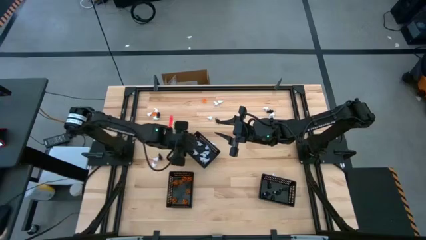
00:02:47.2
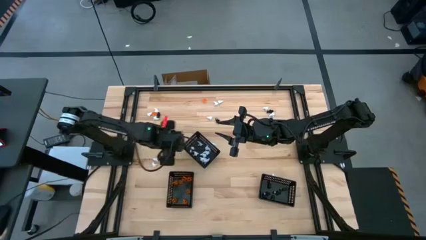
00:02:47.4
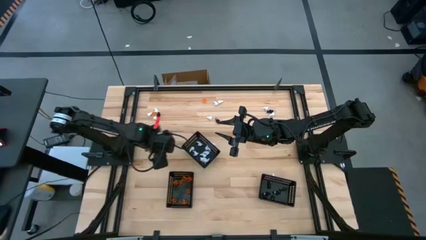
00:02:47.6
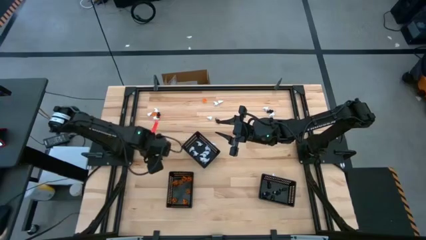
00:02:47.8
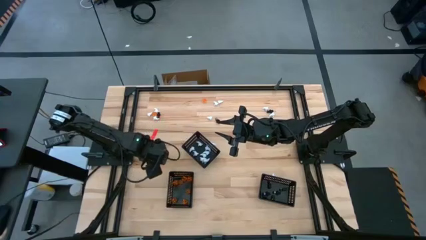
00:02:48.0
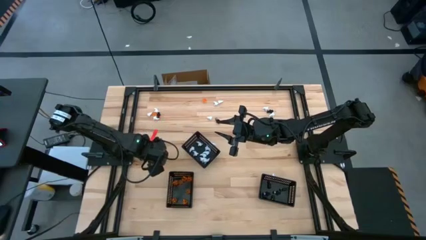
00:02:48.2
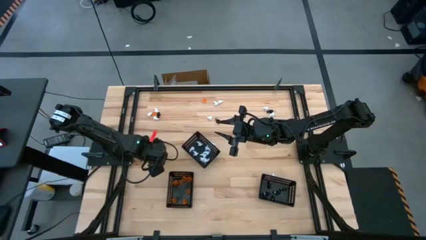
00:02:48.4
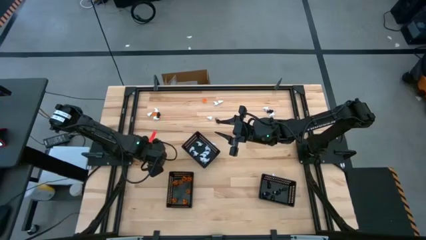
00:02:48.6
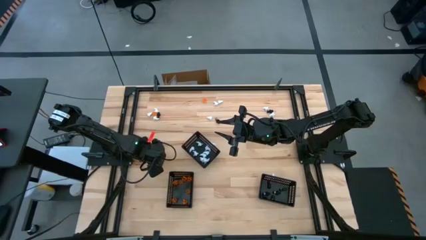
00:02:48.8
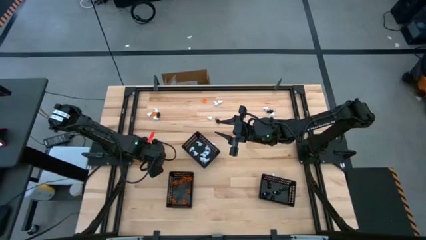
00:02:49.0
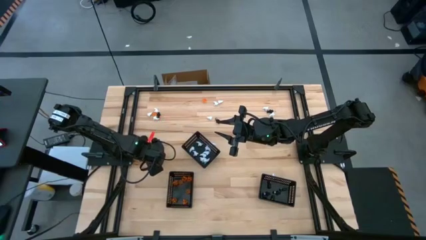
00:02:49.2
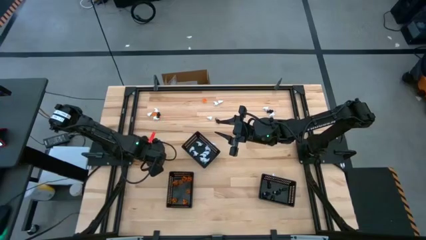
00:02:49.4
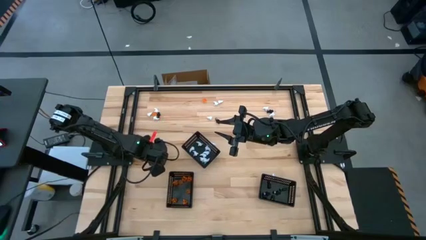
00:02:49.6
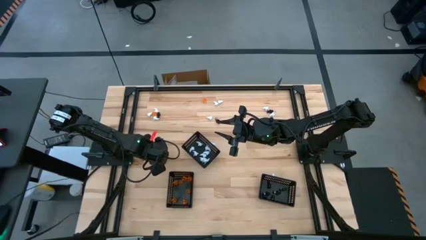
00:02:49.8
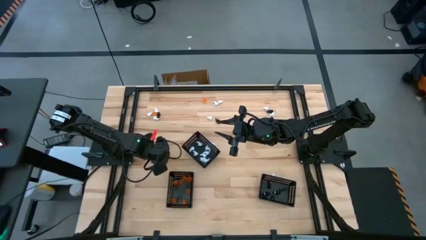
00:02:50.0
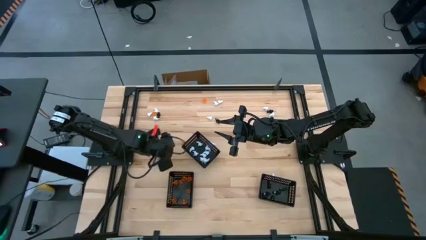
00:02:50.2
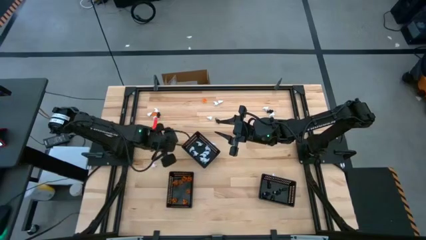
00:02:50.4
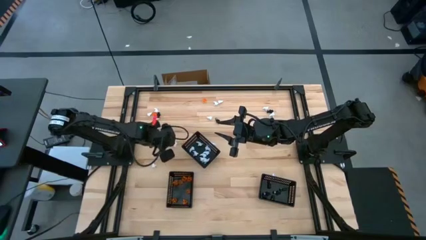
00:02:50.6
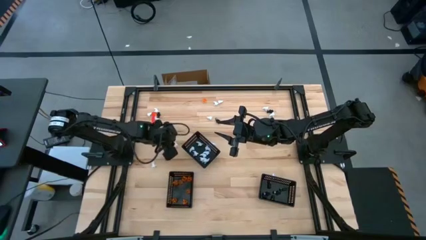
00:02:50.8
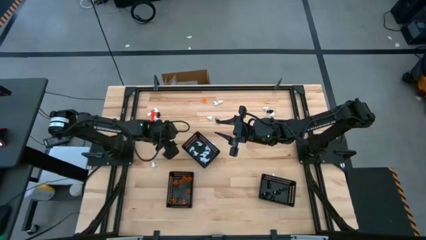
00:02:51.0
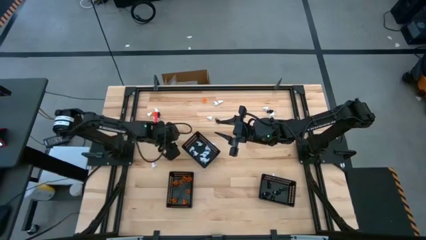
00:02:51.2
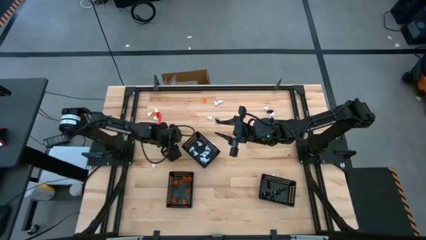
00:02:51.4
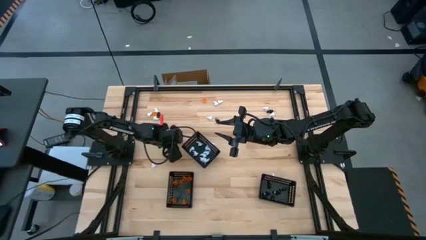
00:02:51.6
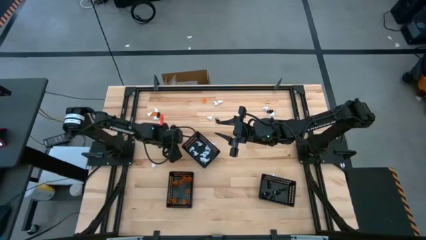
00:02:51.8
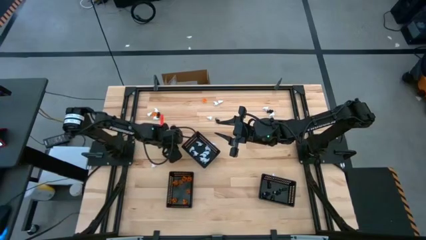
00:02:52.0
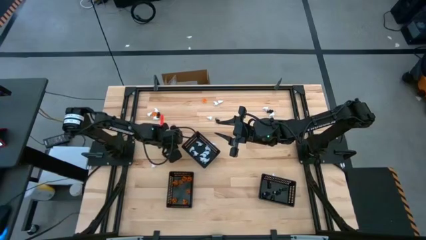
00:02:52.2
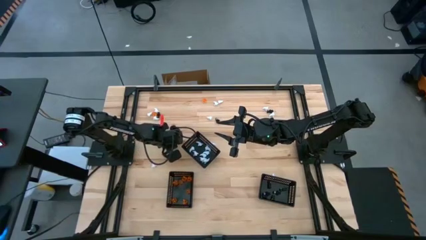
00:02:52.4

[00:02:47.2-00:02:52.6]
Task: Sort Halloween decoration
Put the white ghost toy into the middle black basket

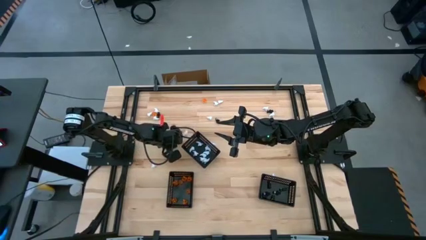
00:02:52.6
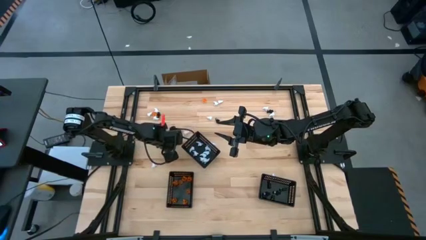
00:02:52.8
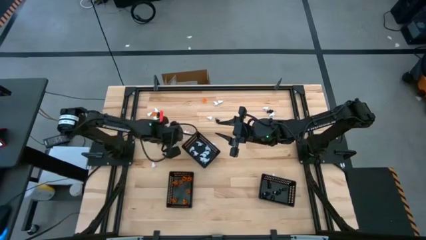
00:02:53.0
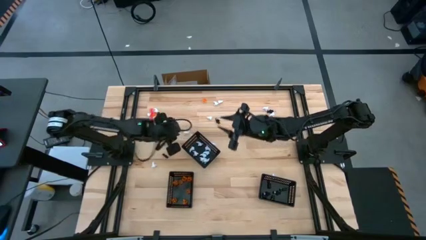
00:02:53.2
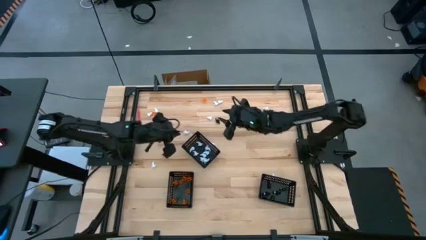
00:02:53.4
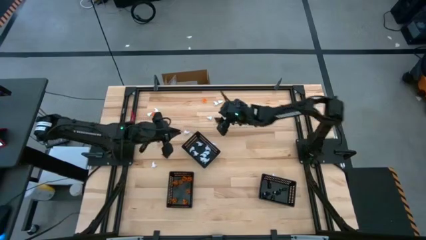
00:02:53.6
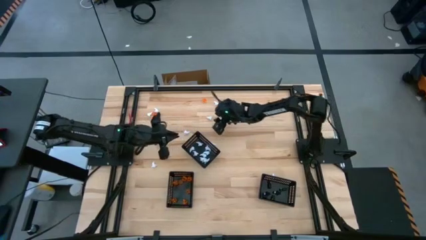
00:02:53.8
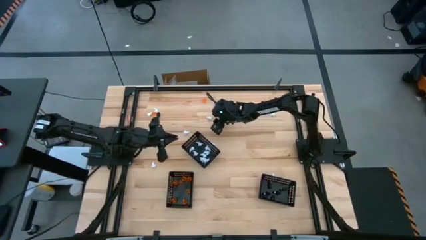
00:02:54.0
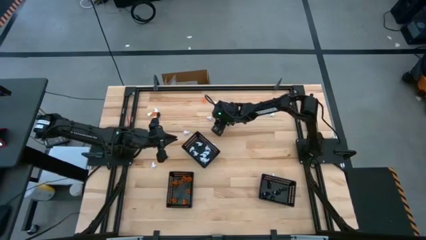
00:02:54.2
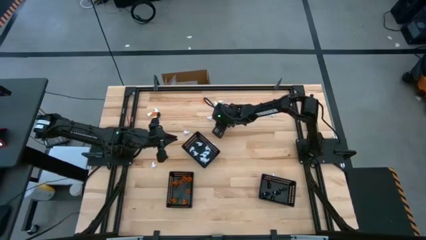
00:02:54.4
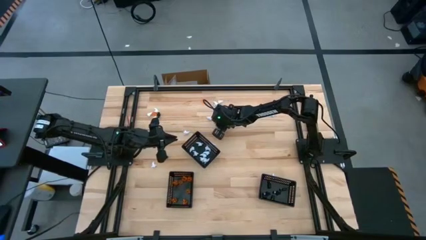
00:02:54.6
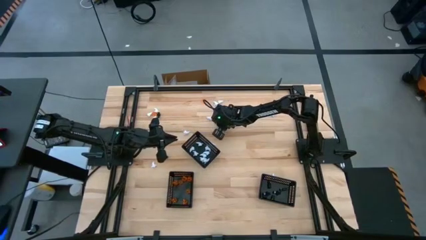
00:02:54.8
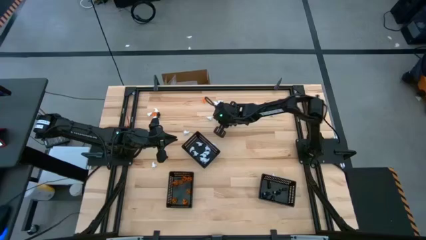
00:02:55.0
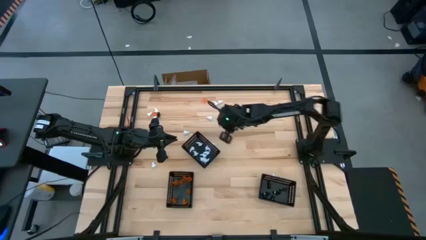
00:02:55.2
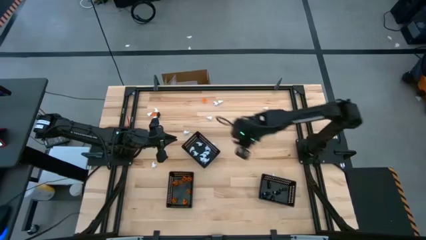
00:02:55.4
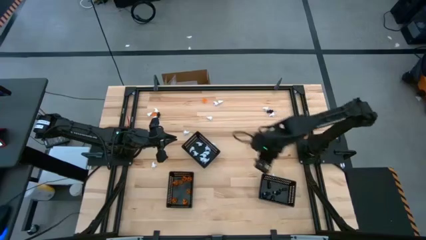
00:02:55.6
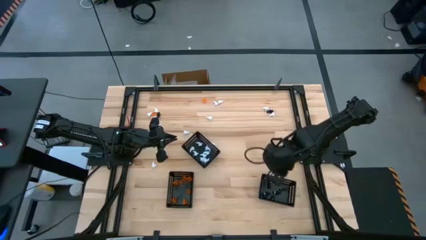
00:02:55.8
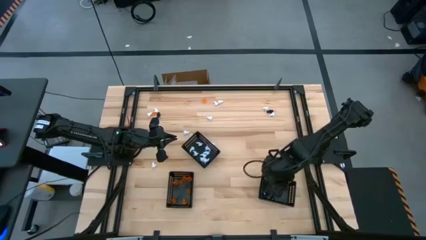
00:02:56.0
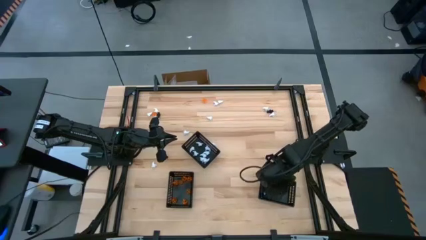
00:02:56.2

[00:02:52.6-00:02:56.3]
Put the black skeleton toy into the right black basket

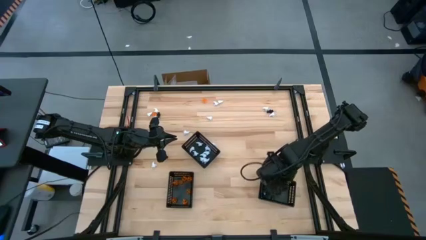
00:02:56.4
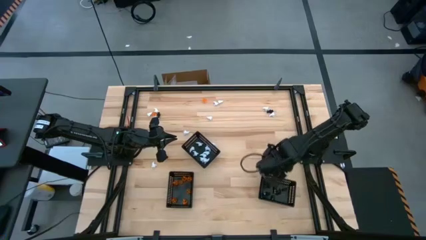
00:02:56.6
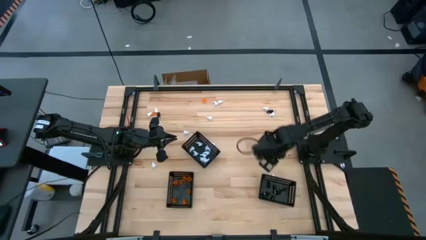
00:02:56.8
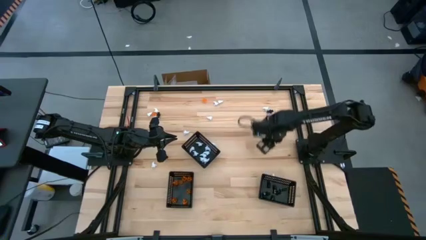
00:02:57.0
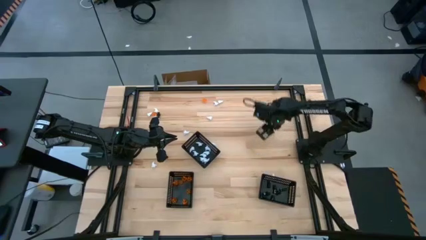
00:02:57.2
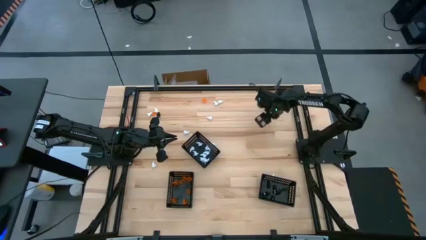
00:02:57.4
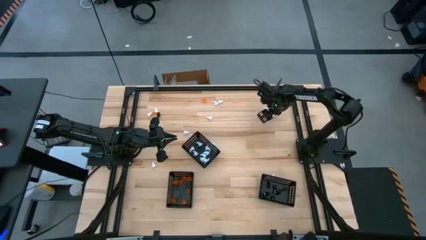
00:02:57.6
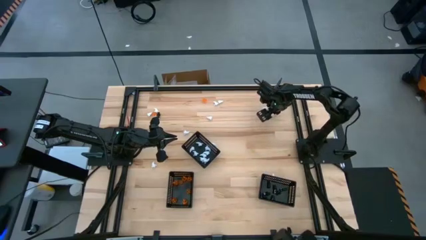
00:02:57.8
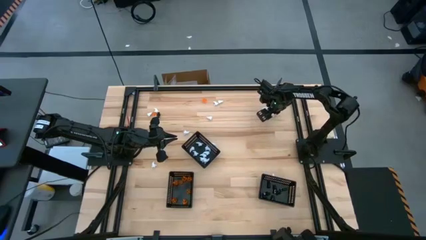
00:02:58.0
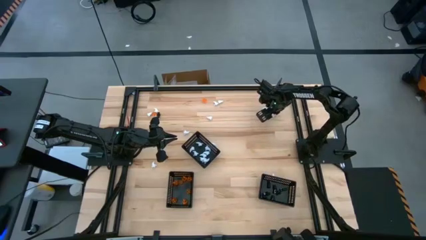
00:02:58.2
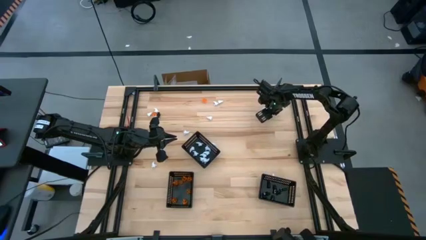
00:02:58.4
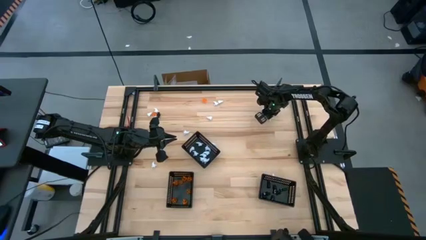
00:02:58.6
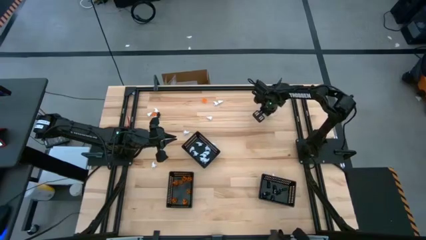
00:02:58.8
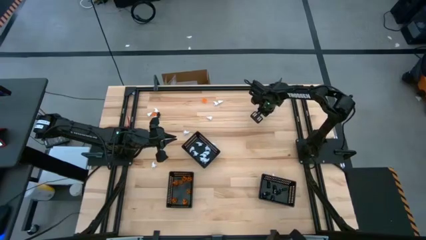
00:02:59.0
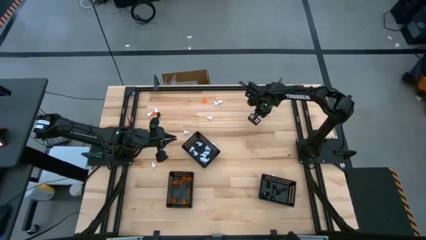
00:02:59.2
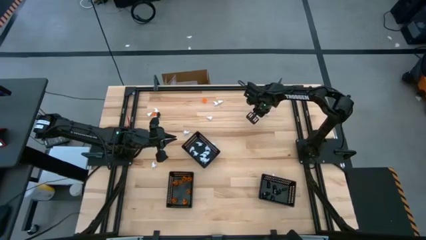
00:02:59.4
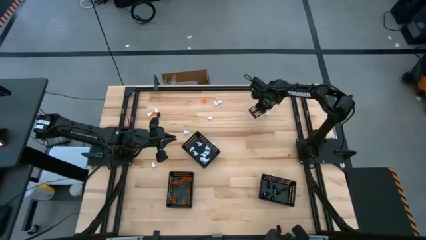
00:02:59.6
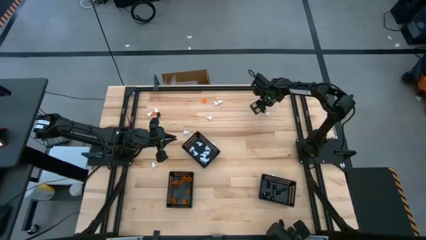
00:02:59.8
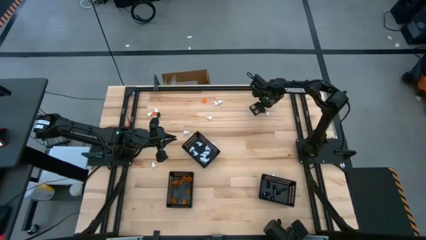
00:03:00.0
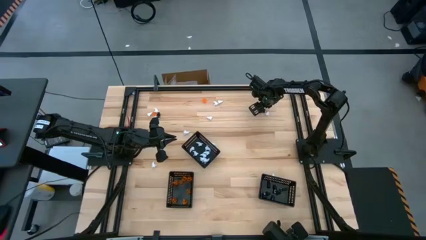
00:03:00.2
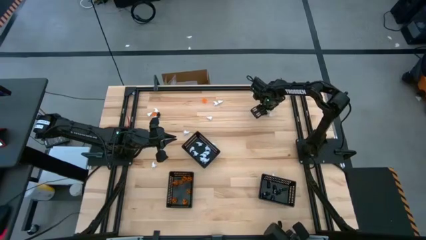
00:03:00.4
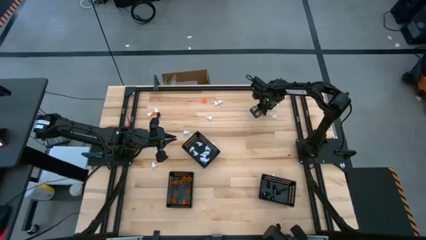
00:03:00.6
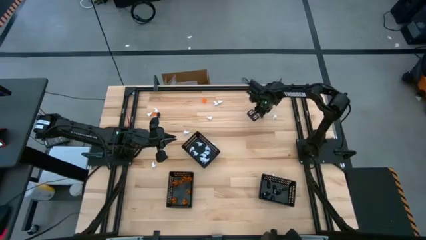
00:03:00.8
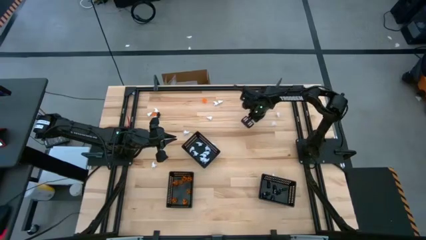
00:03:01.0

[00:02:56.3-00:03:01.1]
Put the black skeleton toy into the right black basket

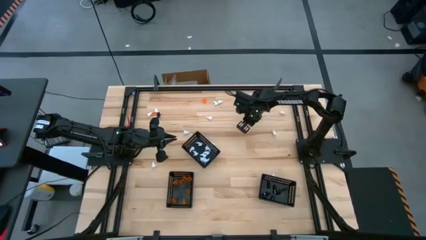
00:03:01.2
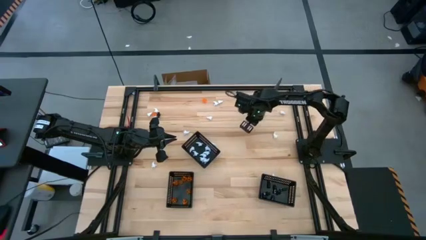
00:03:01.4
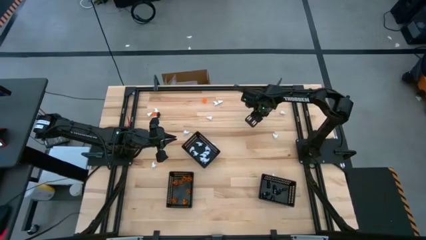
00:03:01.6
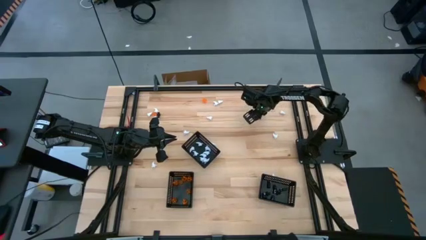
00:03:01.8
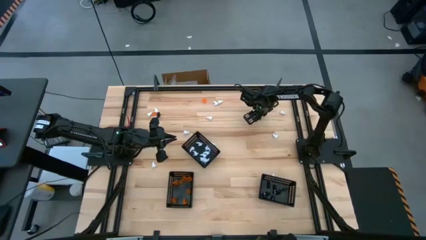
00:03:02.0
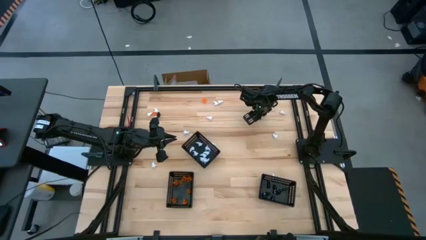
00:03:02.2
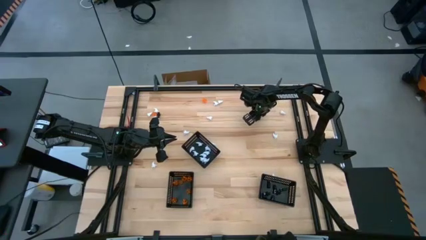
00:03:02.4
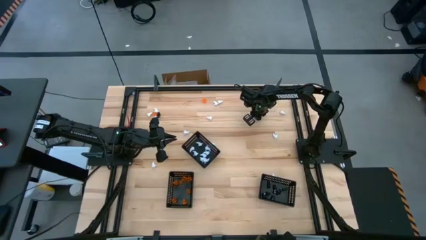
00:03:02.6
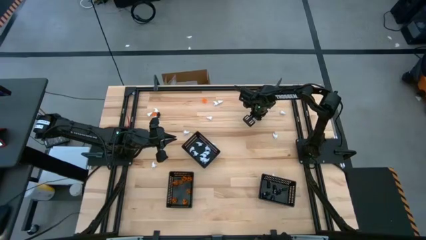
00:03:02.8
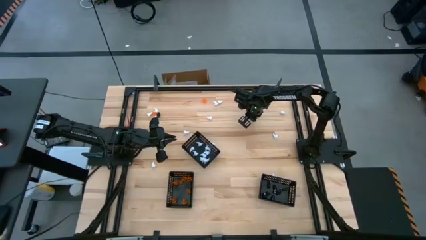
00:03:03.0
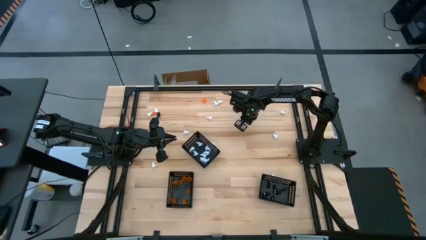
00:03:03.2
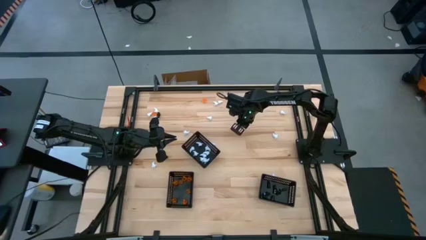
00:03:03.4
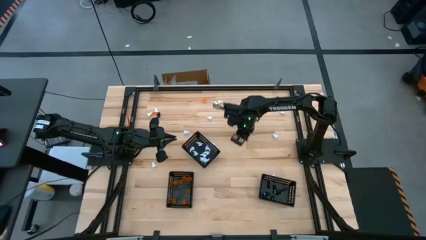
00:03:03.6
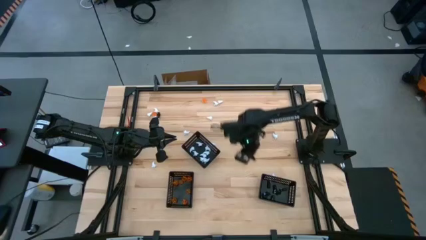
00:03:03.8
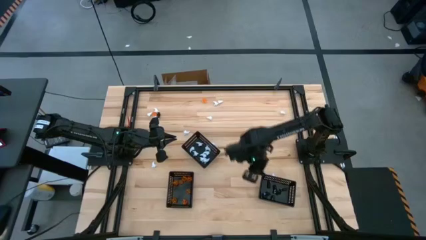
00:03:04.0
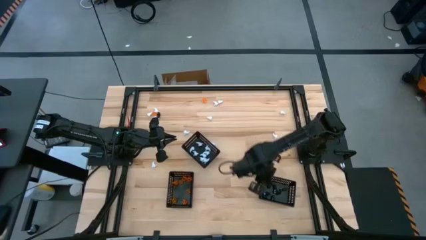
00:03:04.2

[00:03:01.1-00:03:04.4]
Put the black skeleton toy into the right black basket
